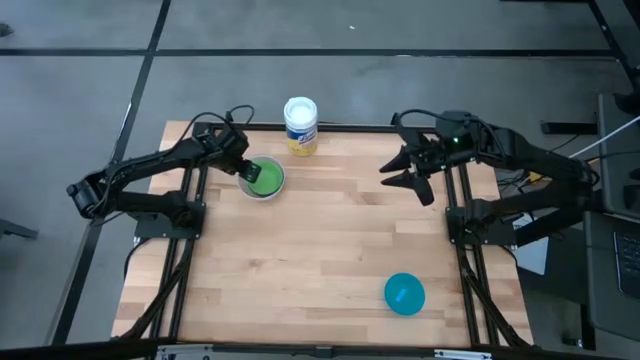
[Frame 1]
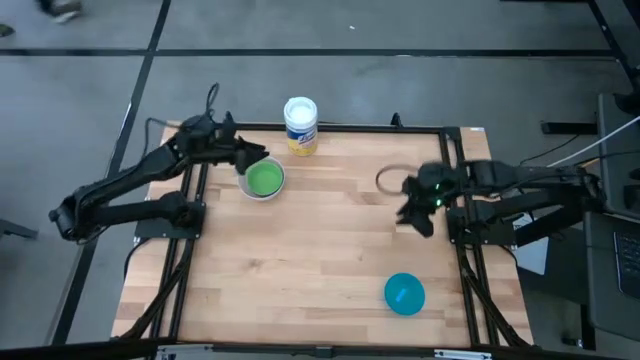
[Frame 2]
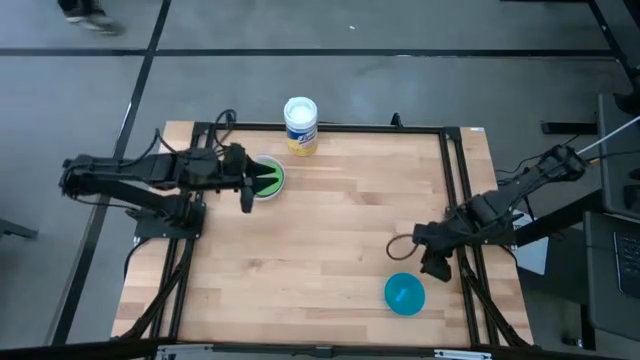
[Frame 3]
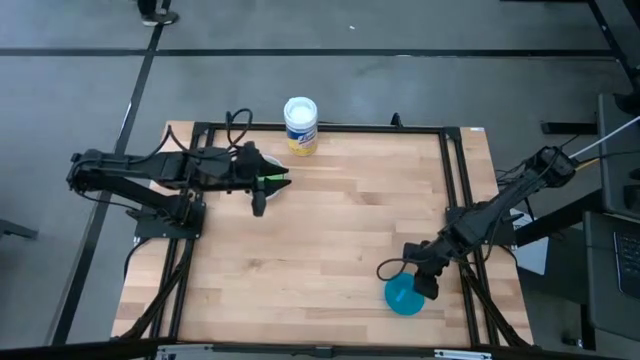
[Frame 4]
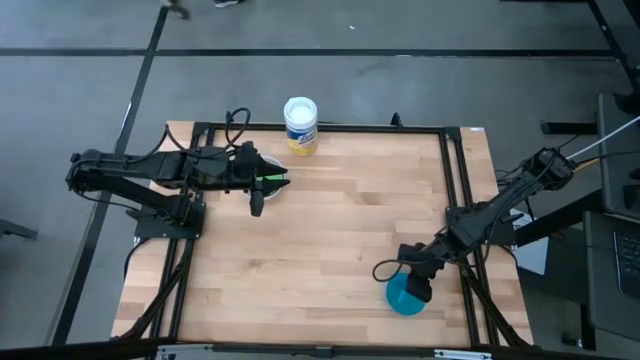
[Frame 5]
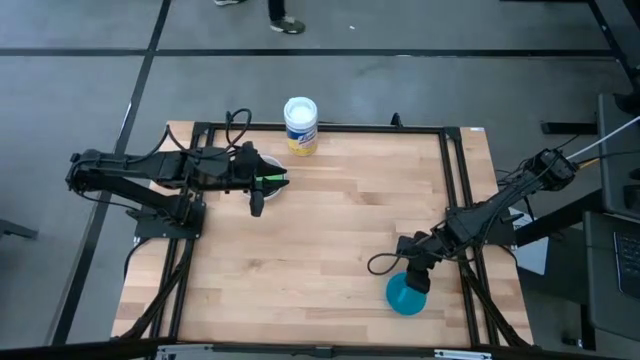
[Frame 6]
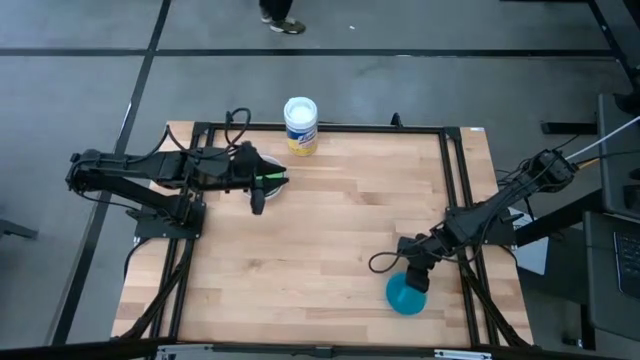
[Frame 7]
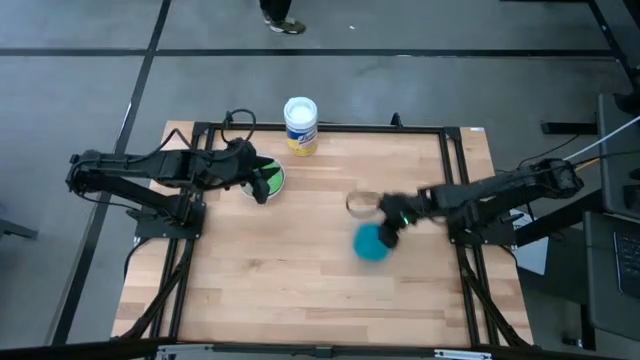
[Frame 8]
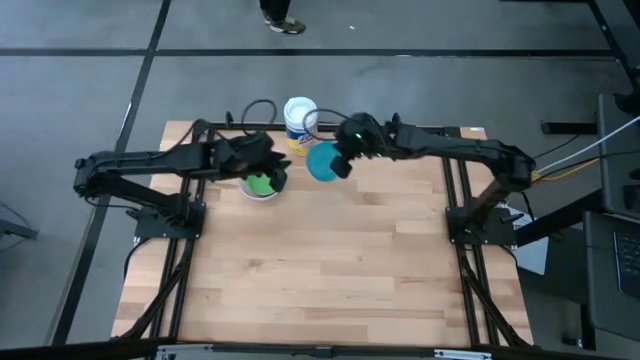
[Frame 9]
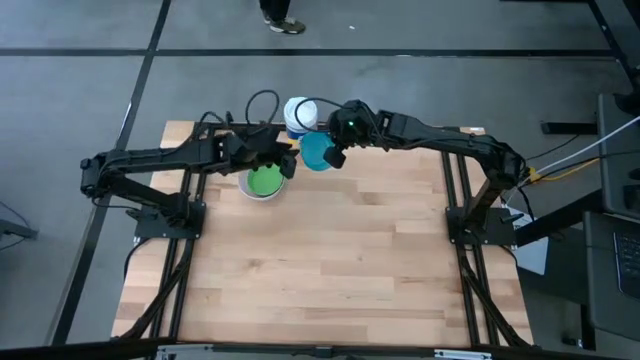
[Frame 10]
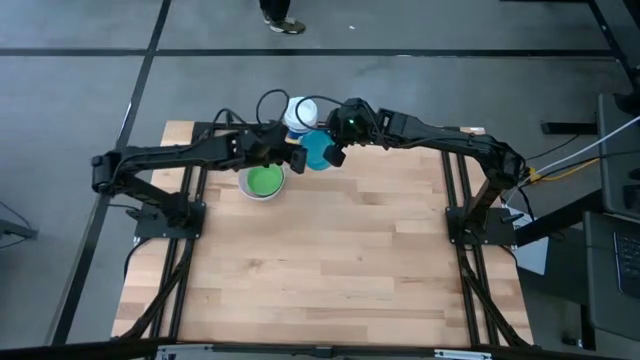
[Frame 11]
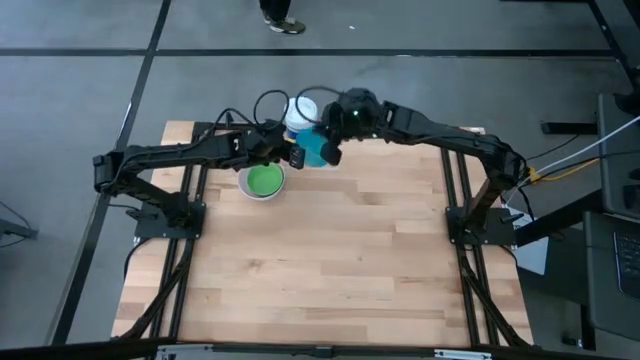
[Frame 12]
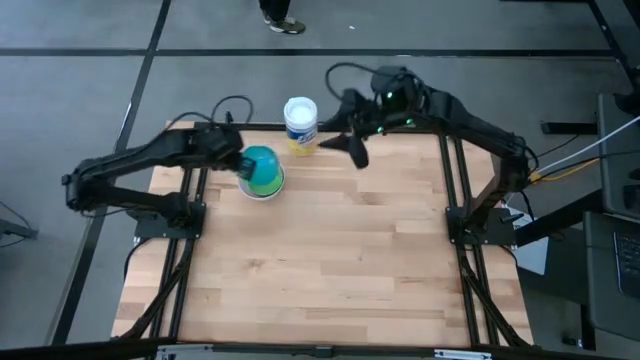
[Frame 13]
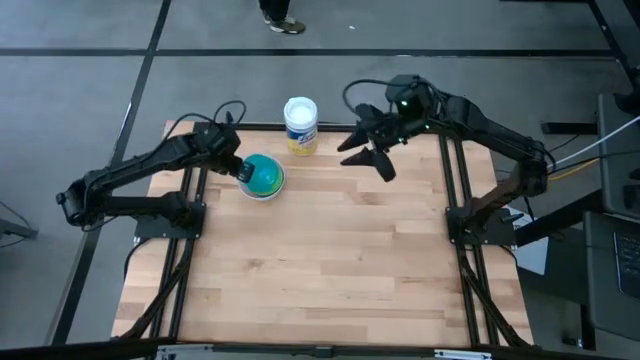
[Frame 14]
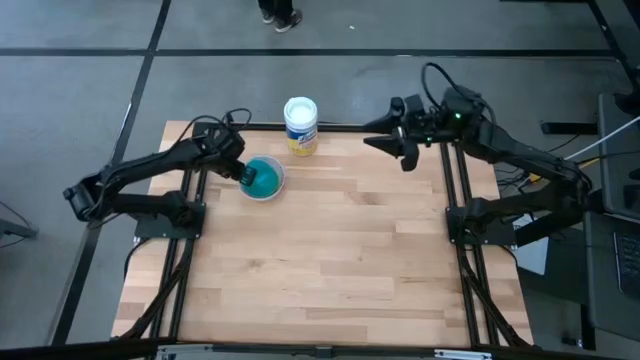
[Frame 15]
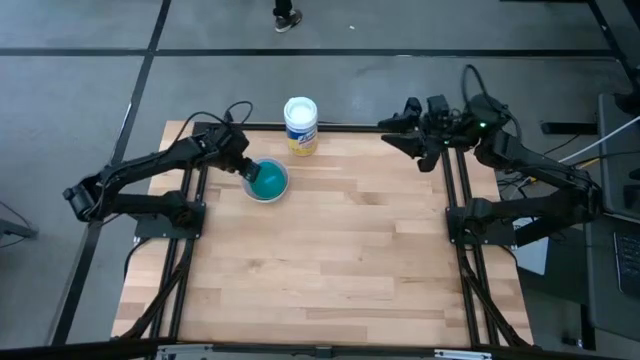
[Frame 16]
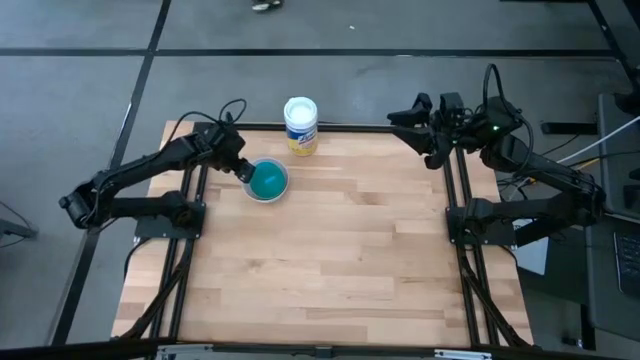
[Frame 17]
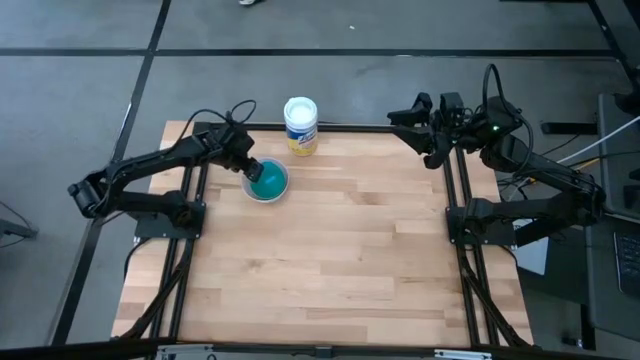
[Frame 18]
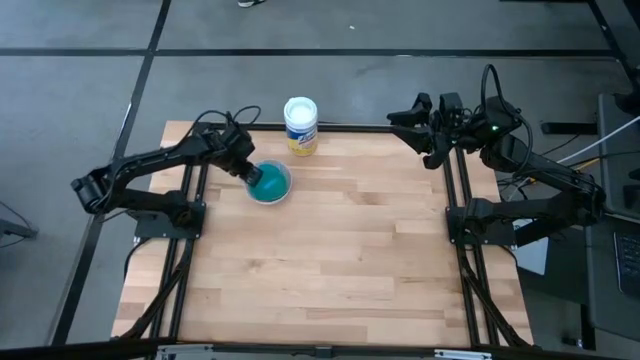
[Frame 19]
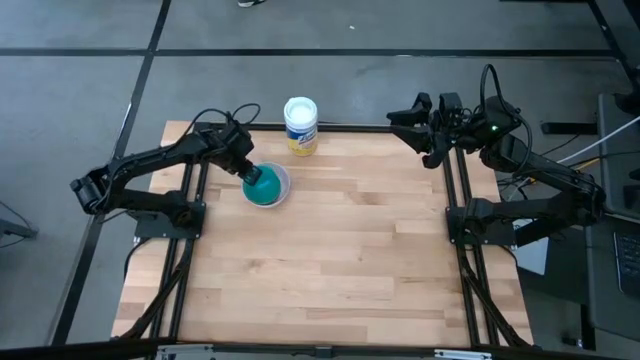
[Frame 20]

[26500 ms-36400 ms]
Stack the light blue bowl on the green bowl

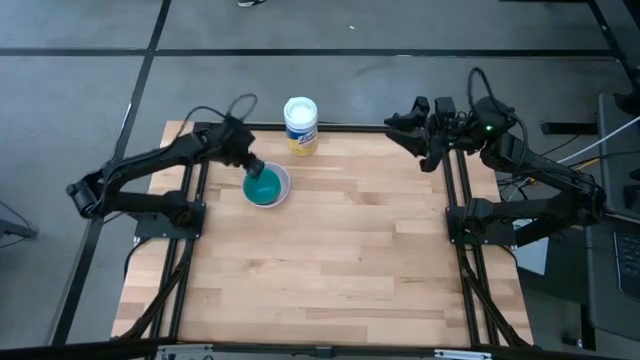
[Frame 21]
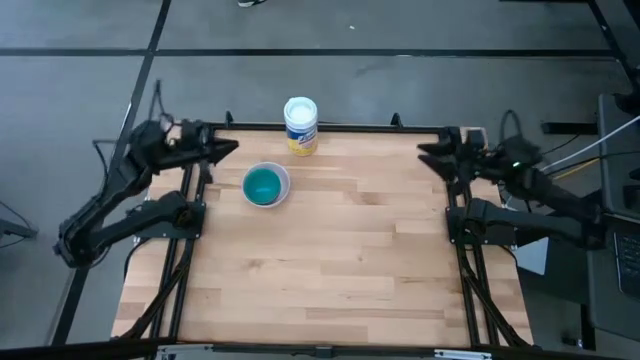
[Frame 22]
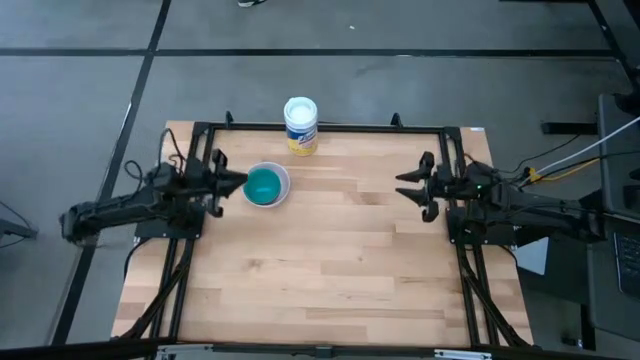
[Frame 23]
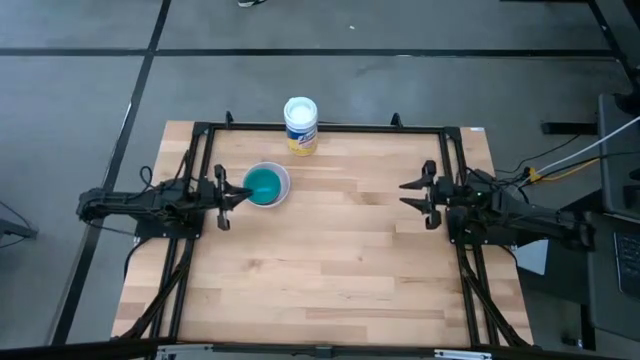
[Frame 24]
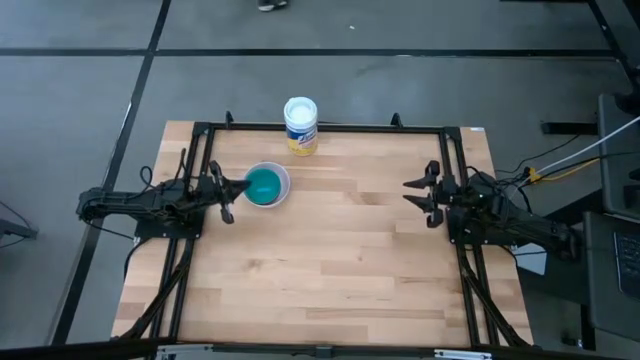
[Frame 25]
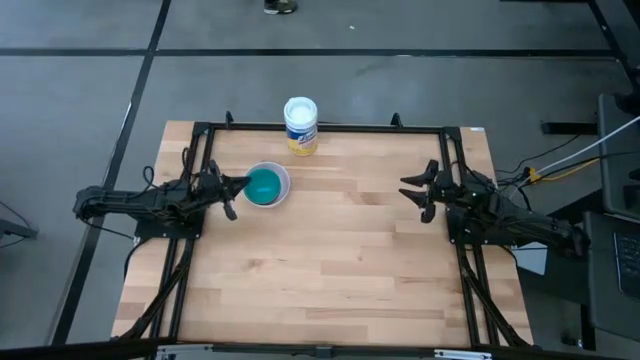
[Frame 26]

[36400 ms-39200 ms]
Return to Home Position
